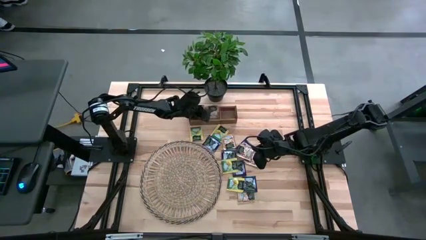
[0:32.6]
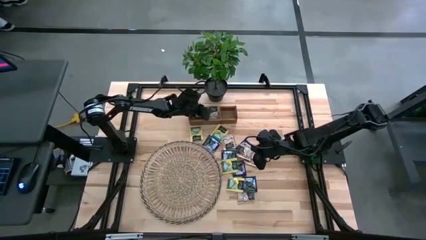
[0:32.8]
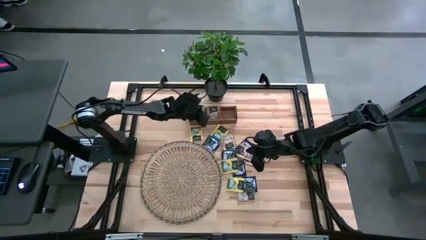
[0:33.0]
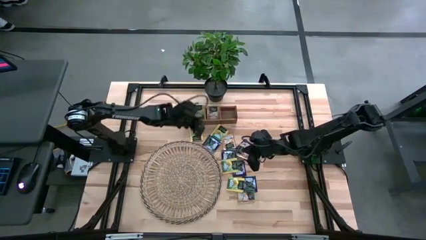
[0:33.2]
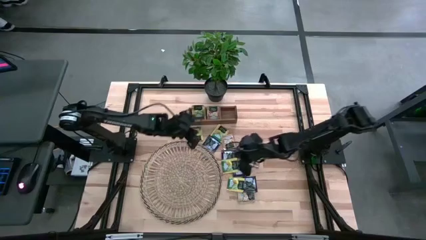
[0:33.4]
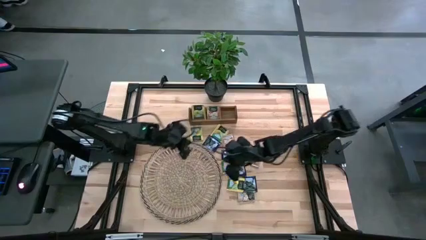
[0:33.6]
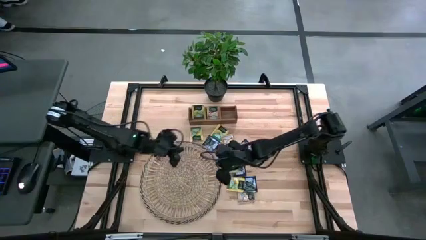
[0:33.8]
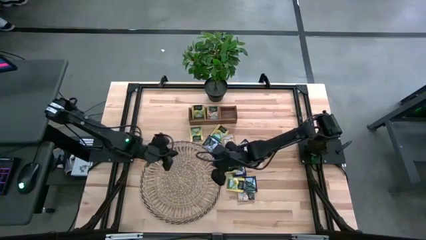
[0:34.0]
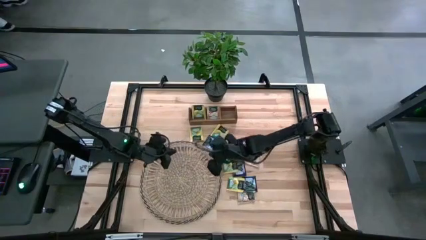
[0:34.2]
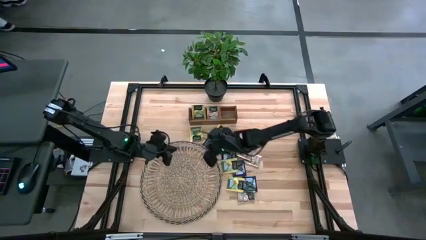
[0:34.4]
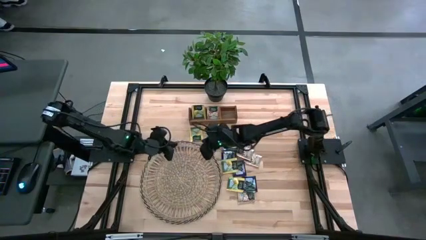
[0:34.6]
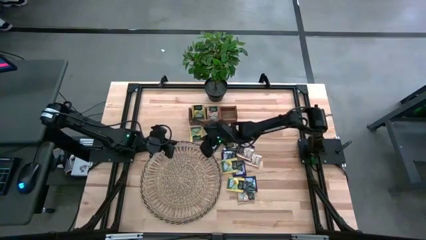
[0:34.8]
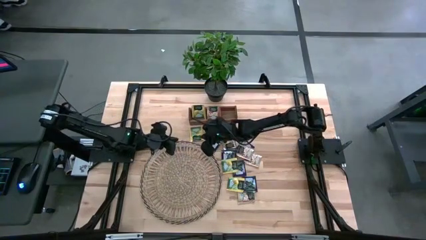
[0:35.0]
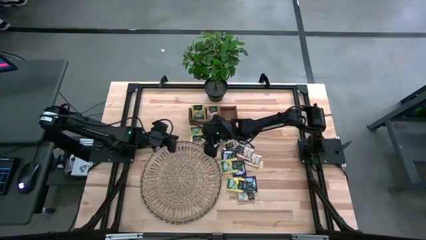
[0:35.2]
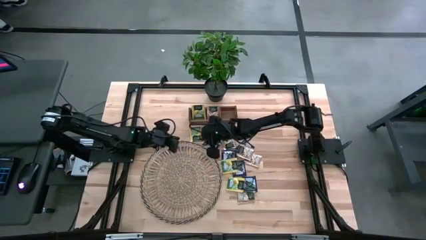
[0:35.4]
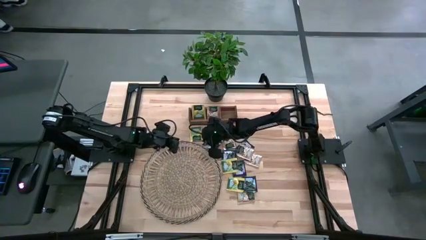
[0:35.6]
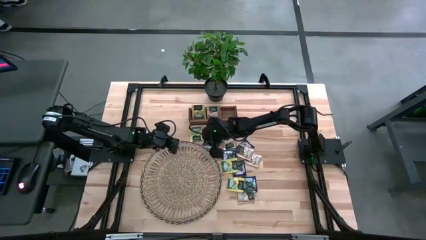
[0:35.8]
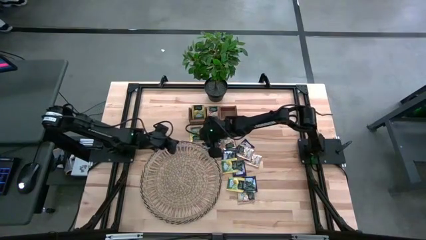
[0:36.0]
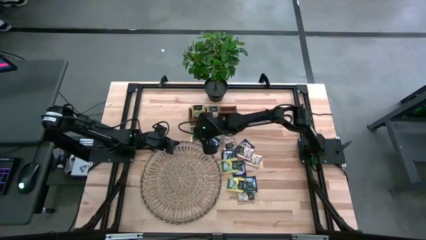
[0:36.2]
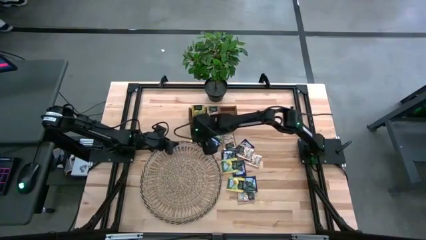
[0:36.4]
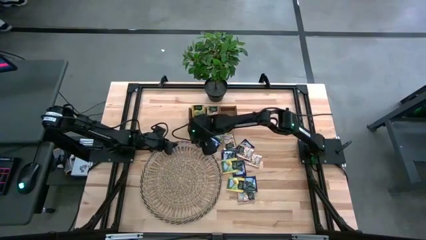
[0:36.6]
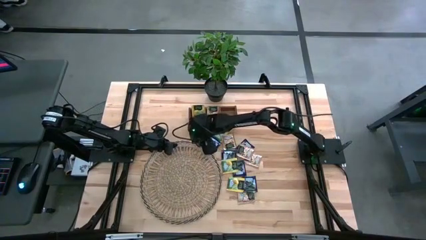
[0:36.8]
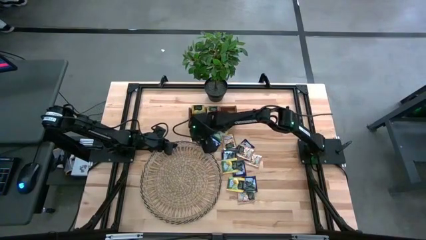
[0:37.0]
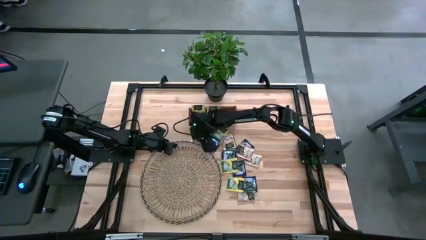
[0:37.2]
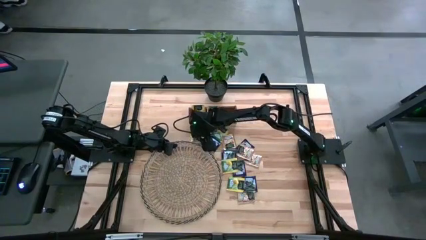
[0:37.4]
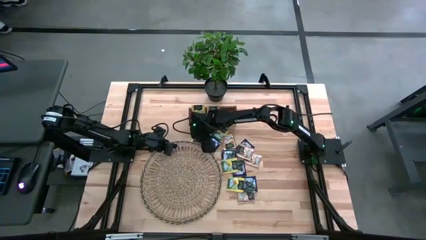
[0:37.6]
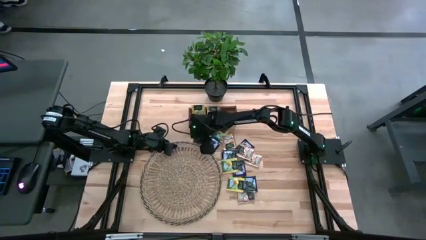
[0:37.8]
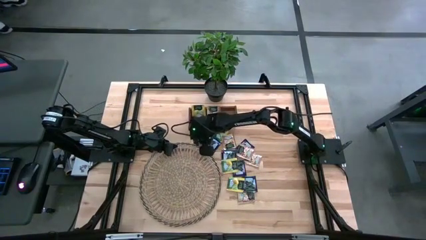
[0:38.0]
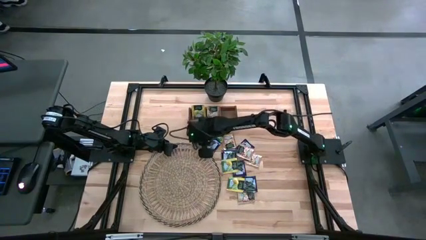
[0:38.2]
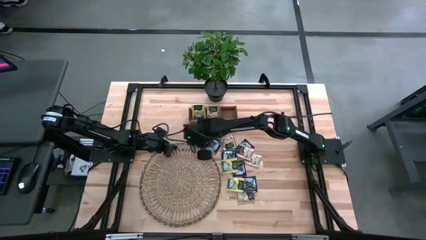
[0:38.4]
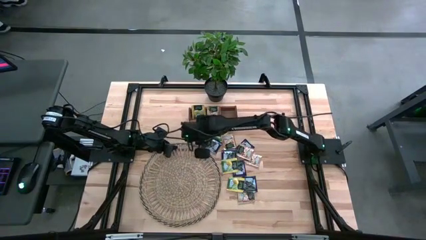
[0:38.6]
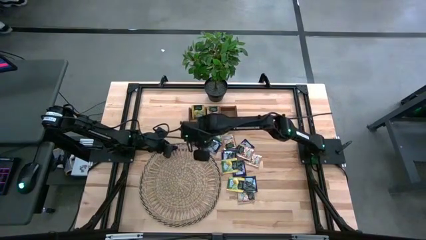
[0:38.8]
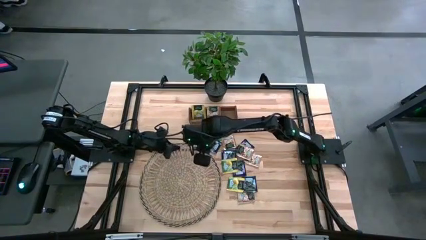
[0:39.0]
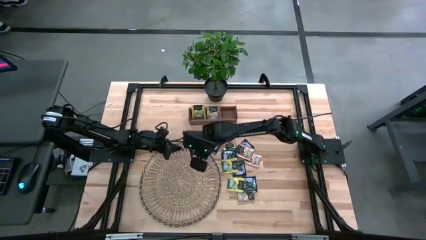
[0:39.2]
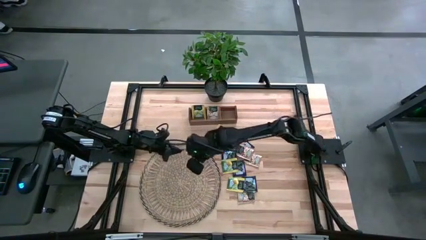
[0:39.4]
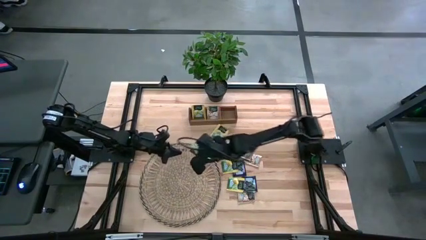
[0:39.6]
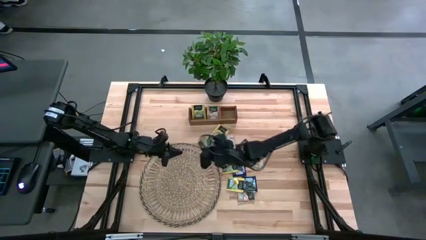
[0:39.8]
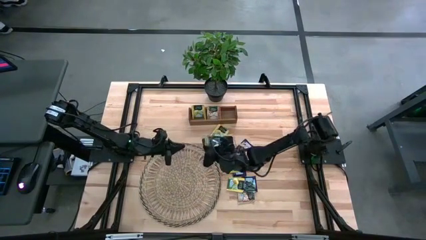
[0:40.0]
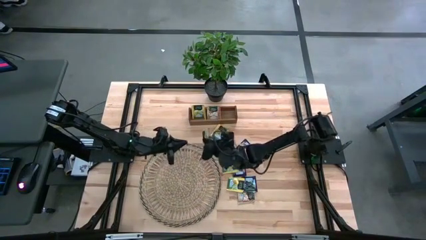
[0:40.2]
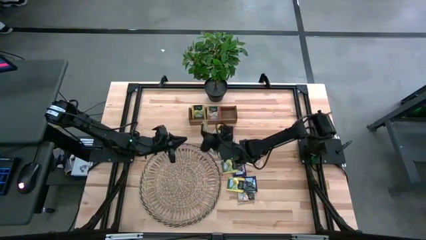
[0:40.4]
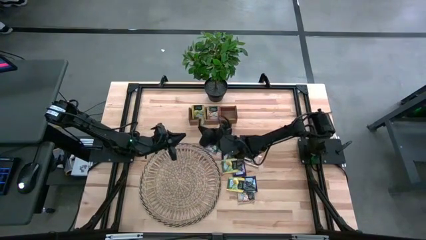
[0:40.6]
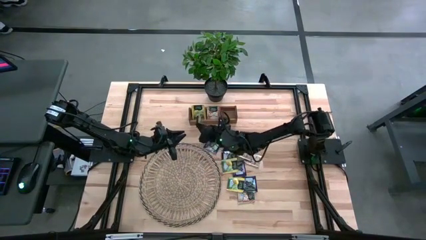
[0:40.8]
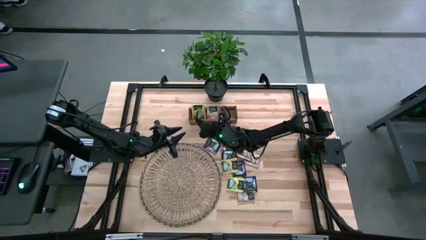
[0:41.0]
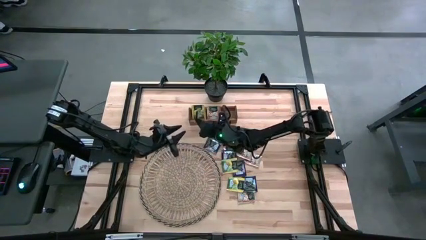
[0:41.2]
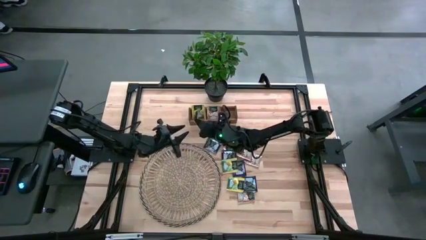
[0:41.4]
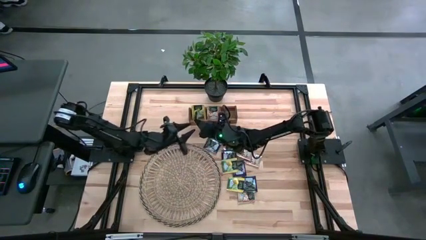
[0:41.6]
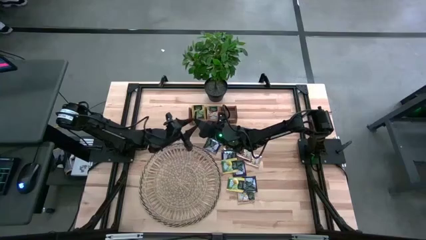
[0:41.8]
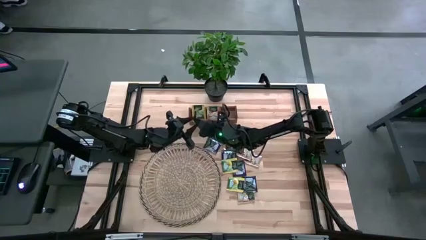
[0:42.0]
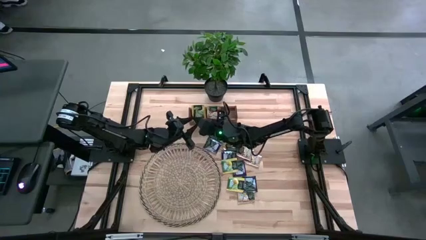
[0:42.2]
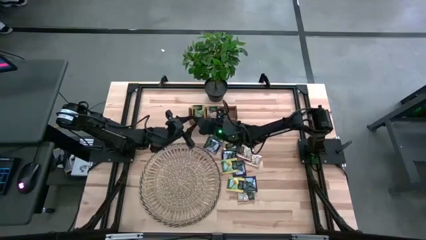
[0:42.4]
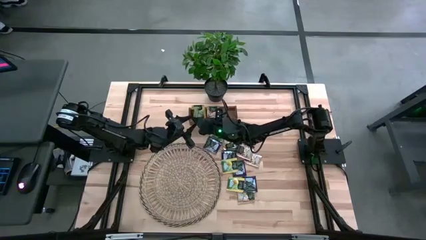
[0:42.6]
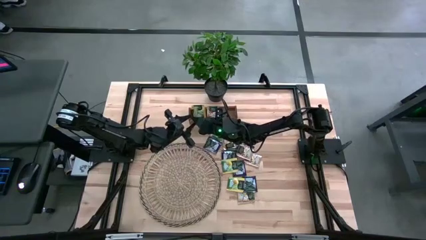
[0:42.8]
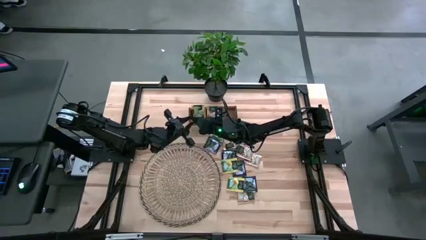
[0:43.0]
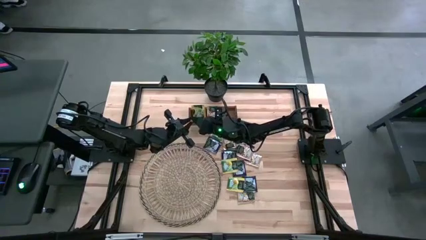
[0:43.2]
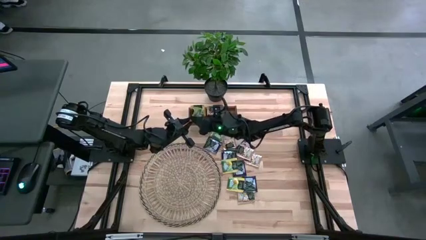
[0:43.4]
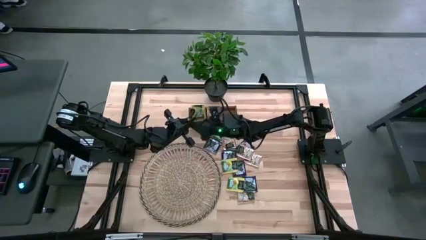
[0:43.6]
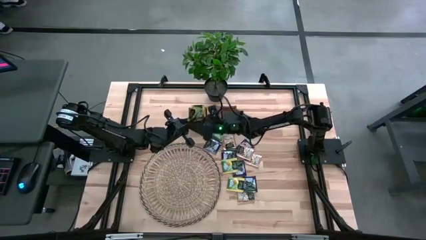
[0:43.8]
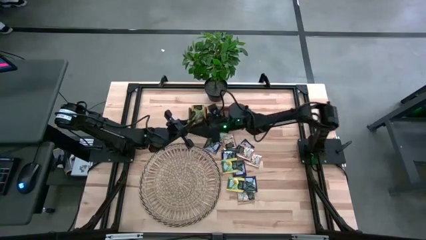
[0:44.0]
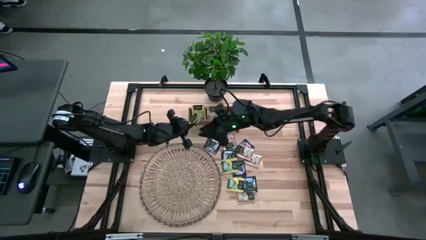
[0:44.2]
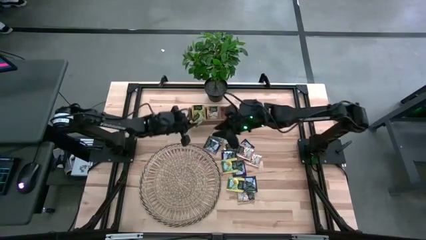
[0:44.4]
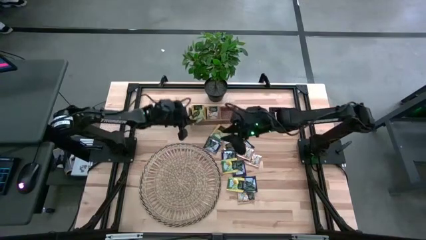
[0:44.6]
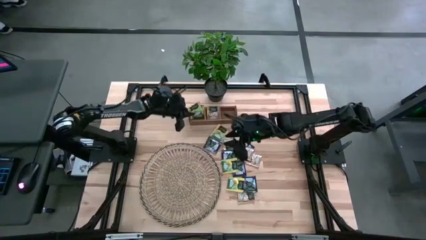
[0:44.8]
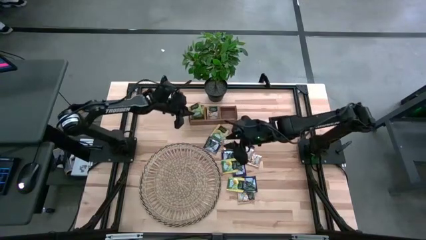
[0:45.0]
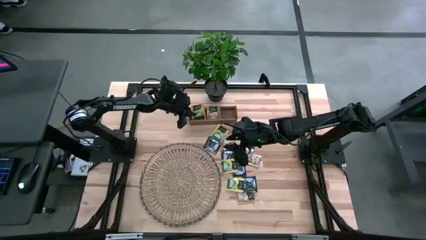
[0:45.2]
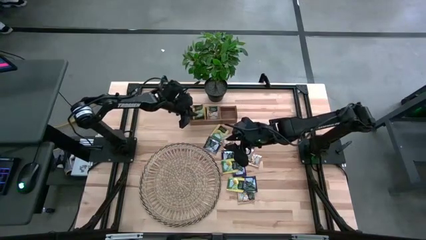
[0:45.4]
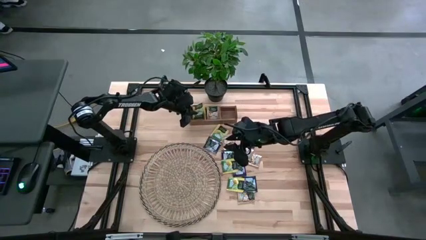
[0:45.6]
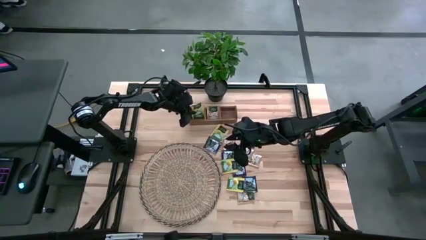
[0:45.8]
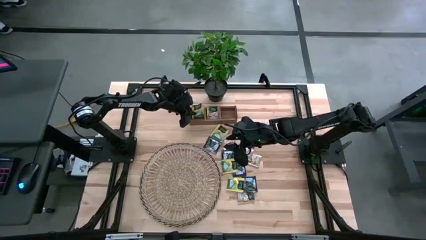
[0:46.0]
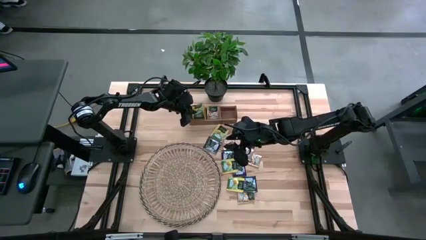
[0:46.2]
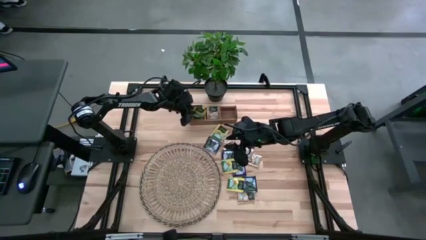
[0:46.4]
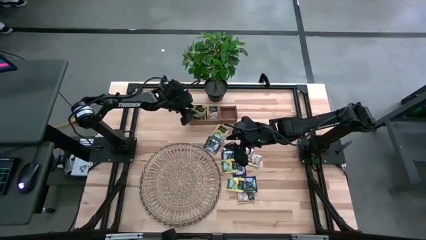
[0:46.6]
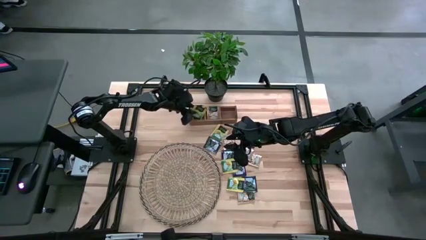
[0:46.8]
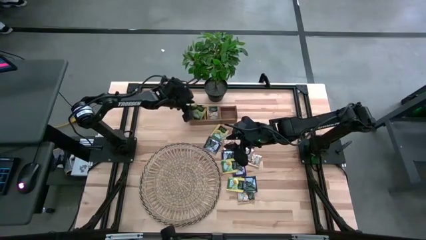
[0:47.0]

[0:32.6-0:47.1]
Task: Pick & Place Tea
Put the yellow tea bag into the left section of the wooden organizer
